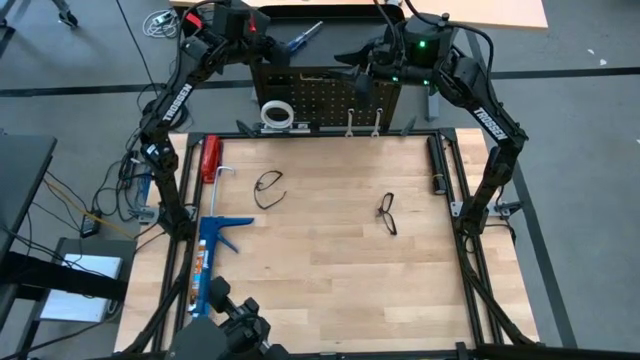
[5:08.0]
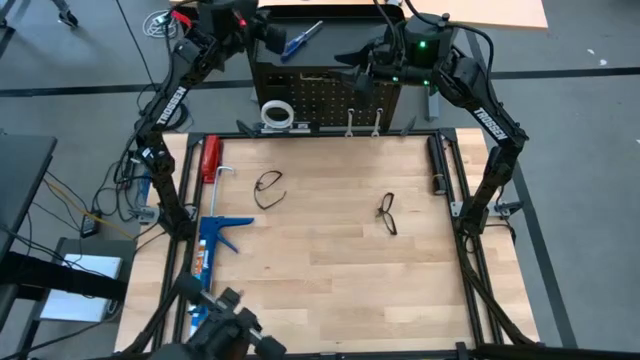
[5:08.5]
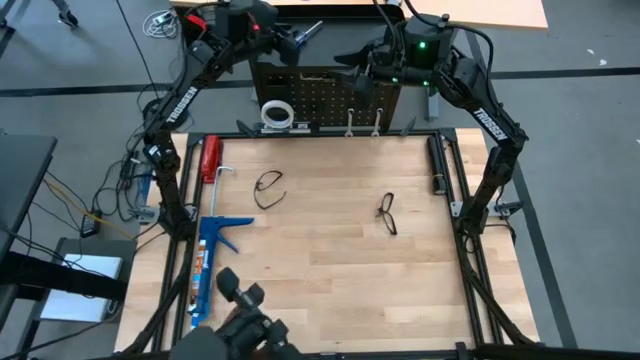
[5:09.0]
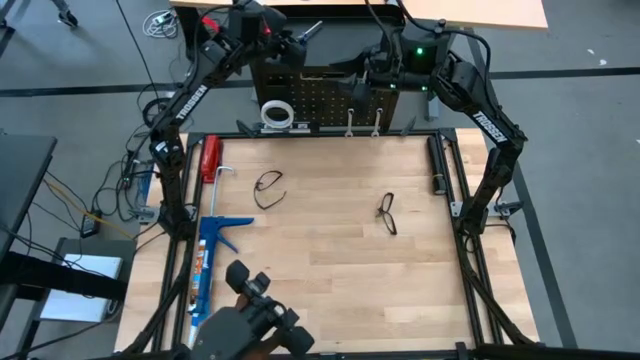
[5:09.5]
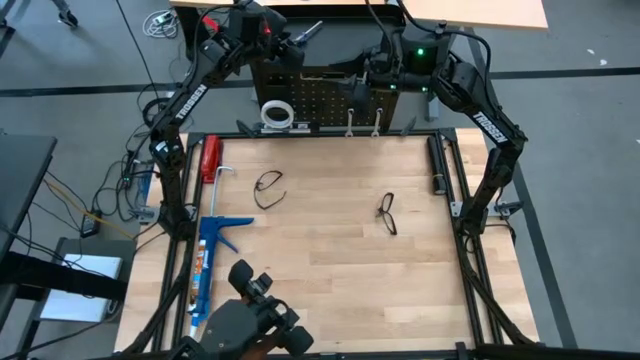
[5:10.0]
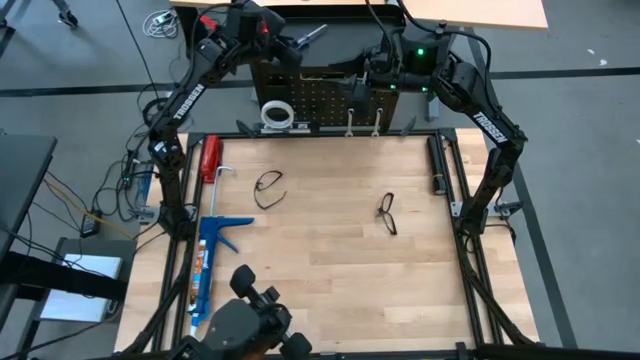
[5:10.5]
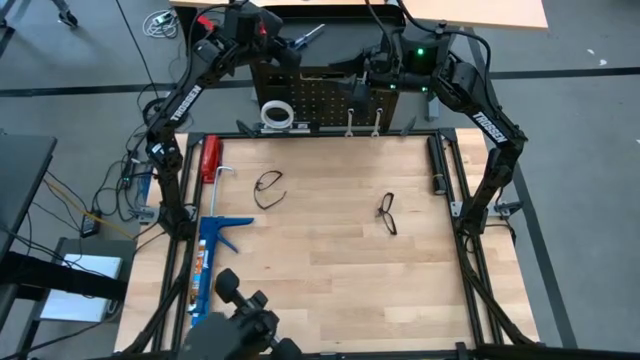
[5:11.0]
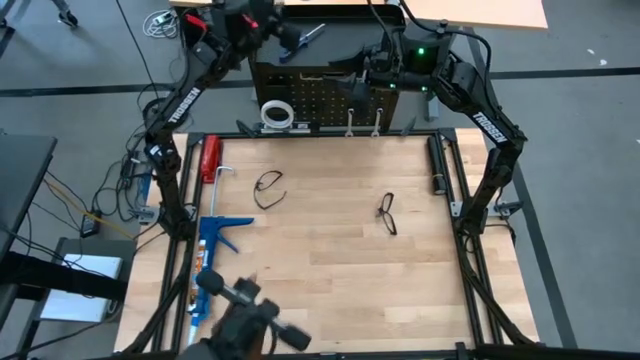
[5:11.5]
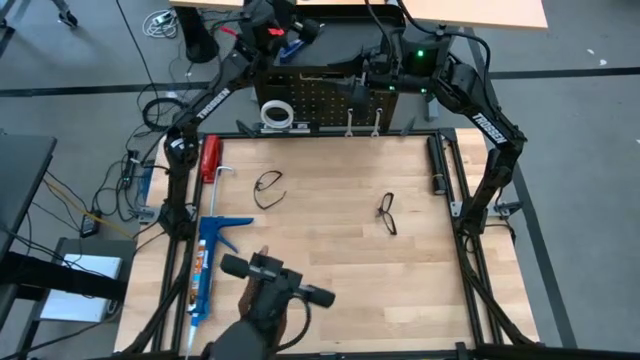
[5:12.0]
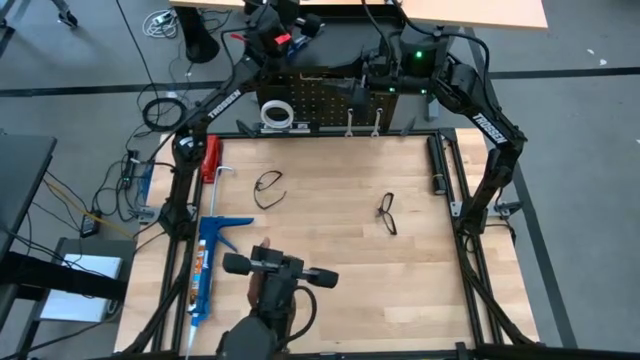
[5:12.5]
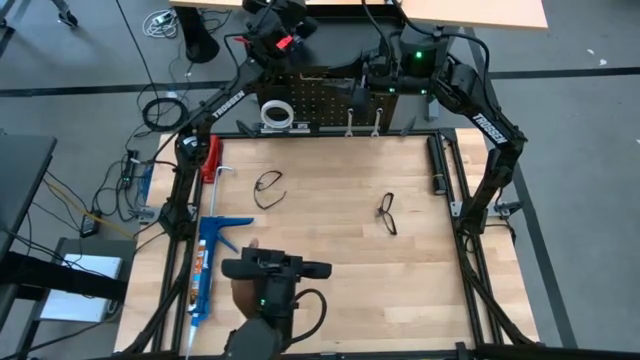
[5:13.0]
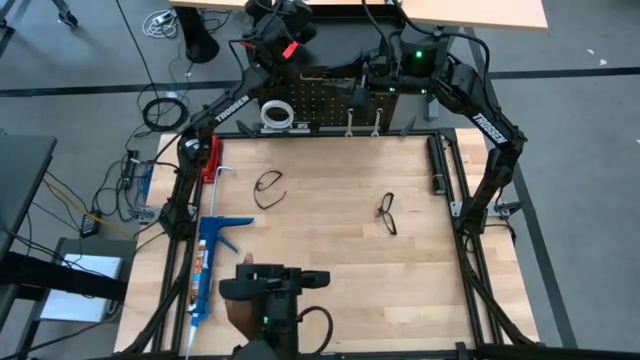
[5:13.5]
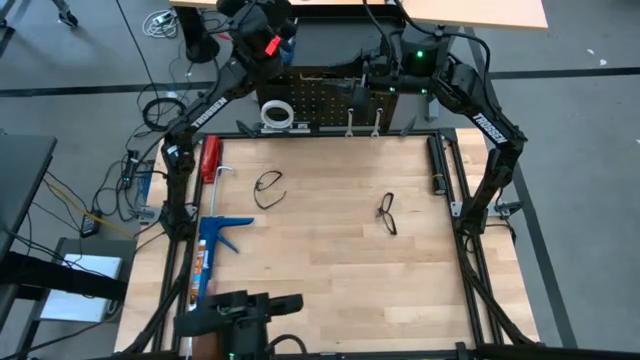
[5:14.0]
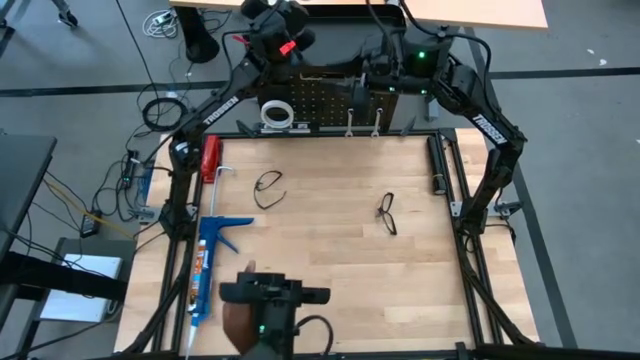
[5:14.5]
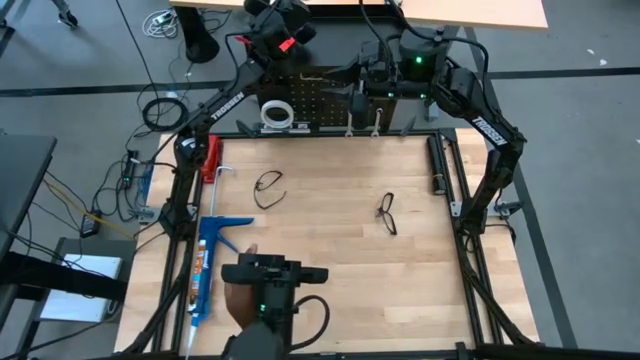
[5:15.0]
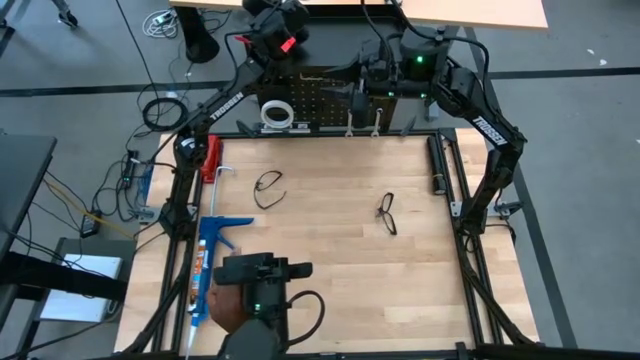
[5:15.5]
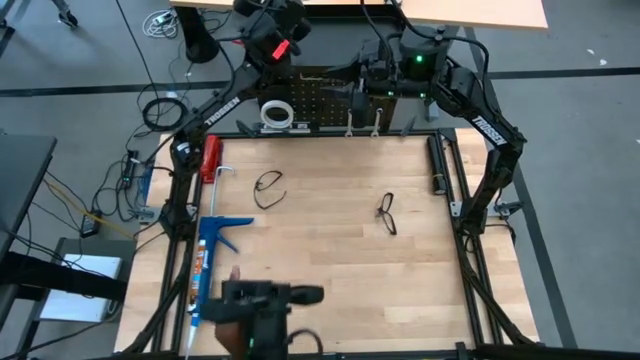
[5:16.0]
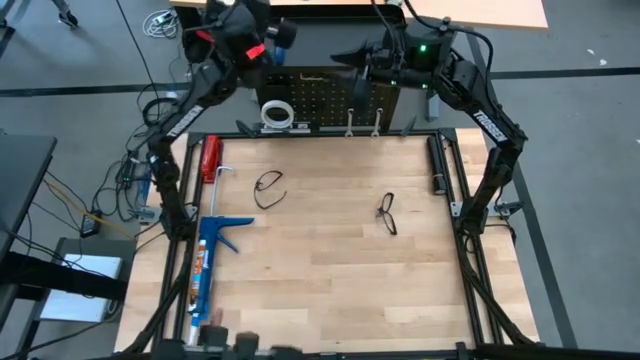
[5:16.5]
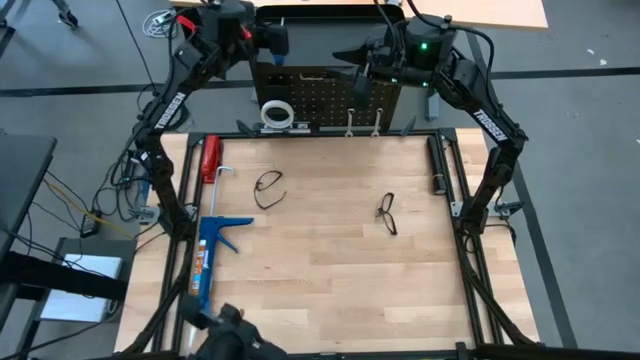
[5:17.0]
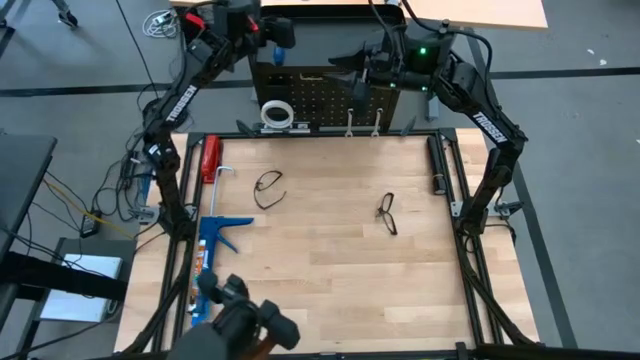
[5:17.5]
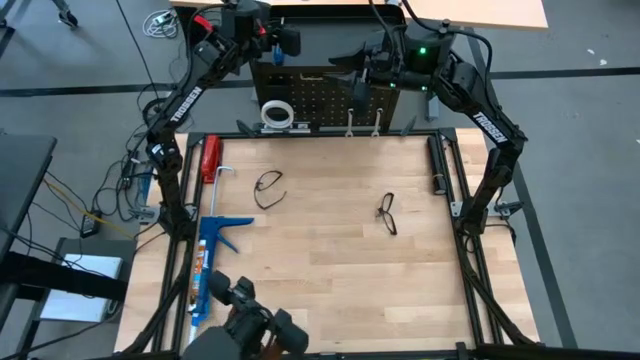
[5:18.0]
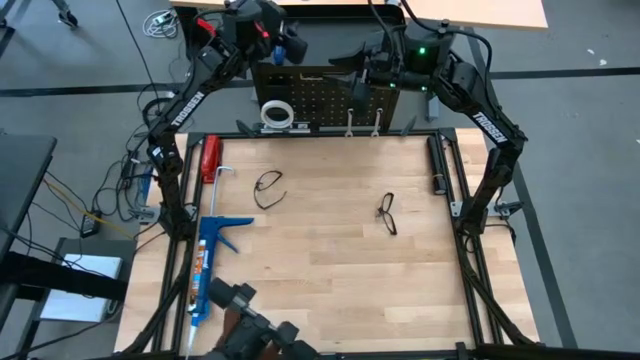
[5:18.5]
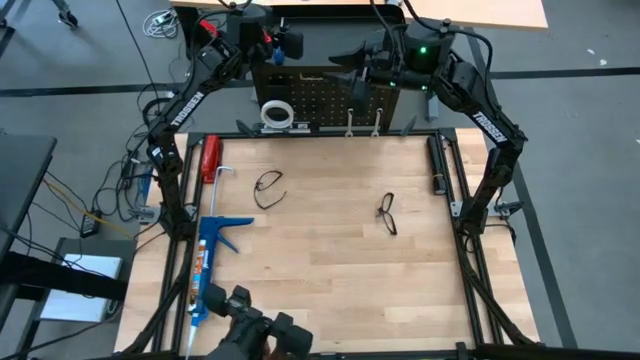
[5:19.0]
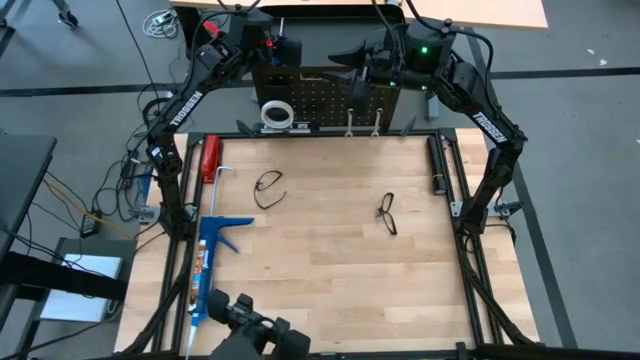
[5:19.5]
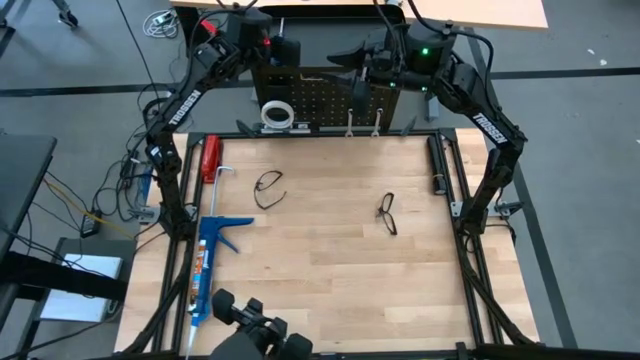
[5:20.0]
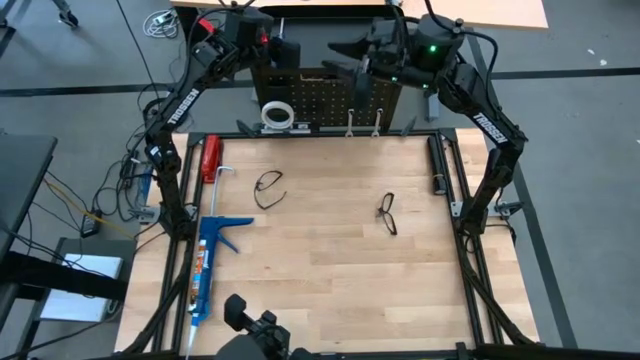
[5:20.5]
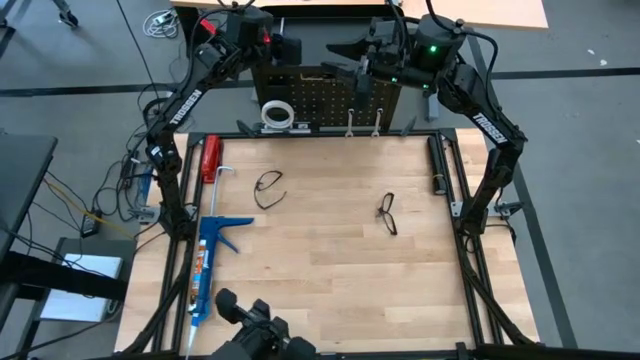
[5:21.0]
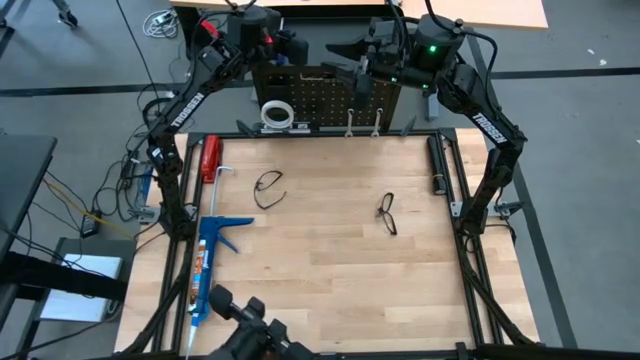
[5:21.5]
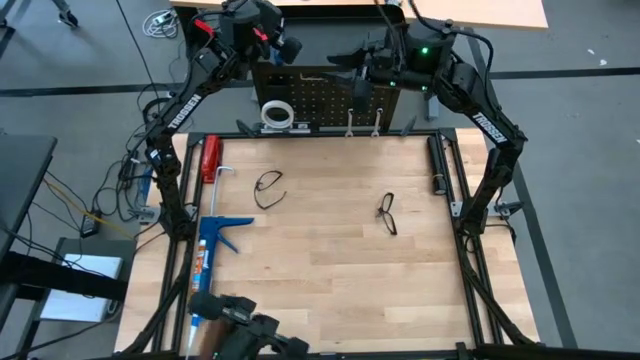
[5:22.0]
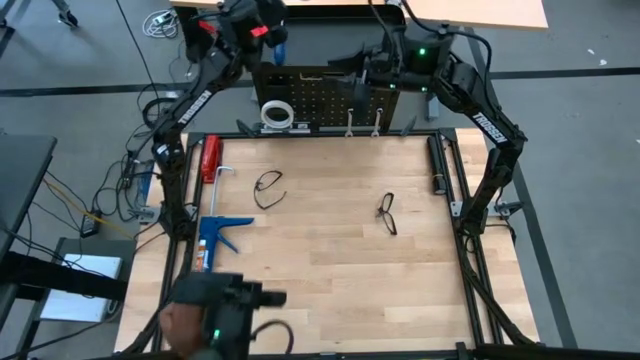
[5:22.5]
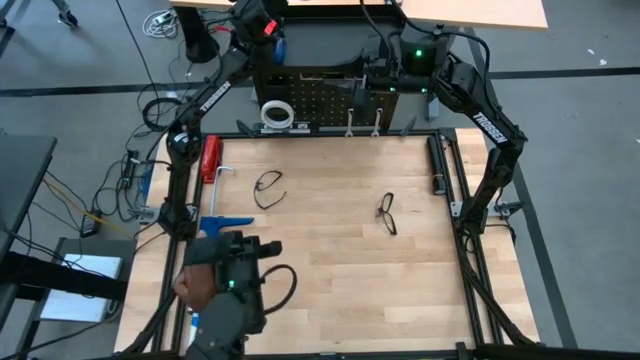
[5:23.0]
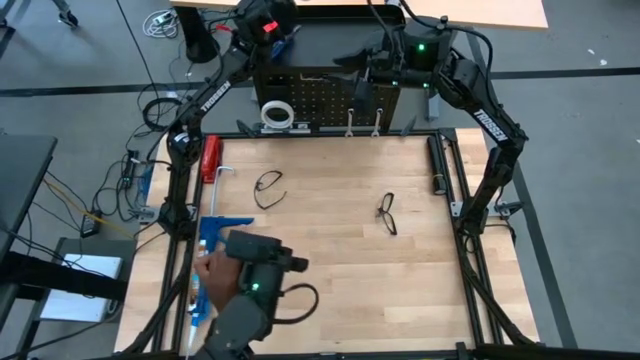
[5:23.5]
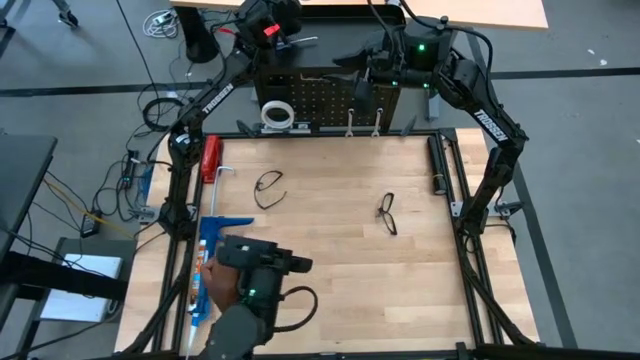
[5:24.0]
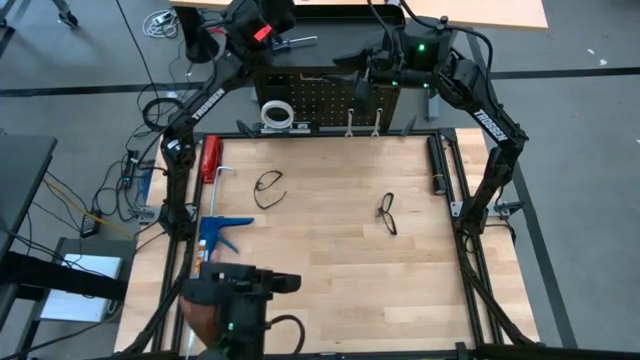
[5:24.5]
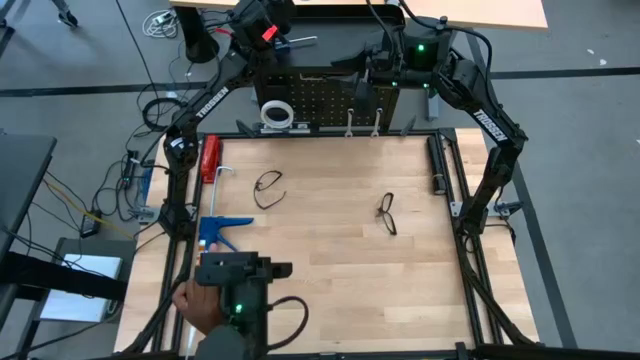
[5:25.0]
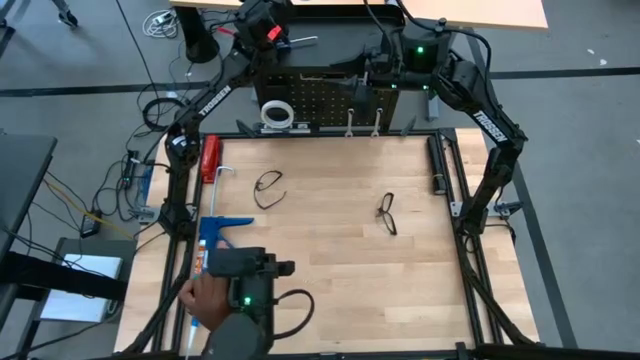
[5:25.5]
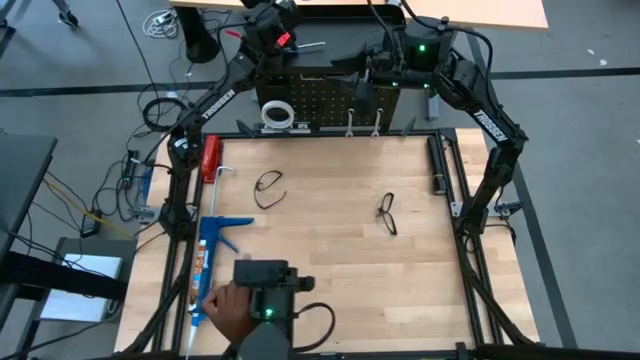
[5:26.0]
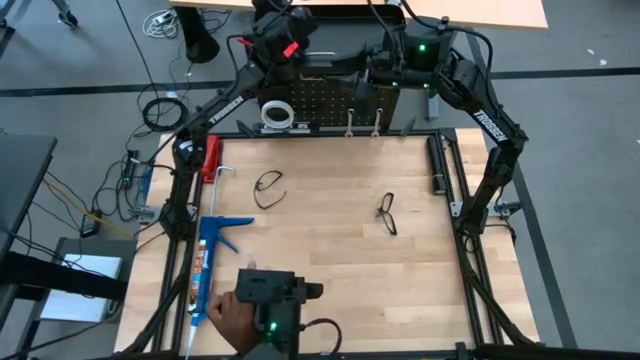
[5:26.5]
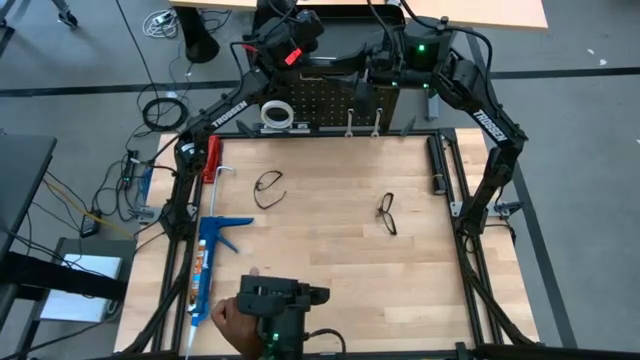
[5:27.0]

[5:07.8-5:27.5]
Task: Hang tools onto peg board
Remove the blue screwdriver from the black pegboard

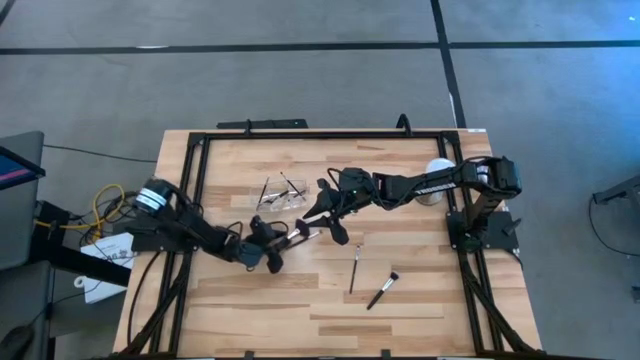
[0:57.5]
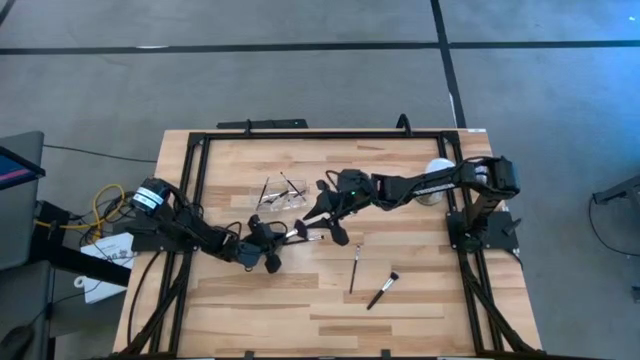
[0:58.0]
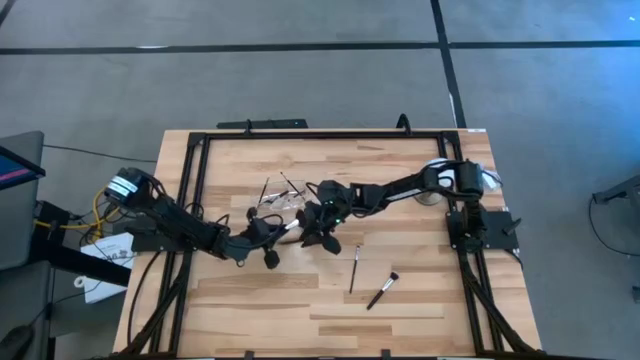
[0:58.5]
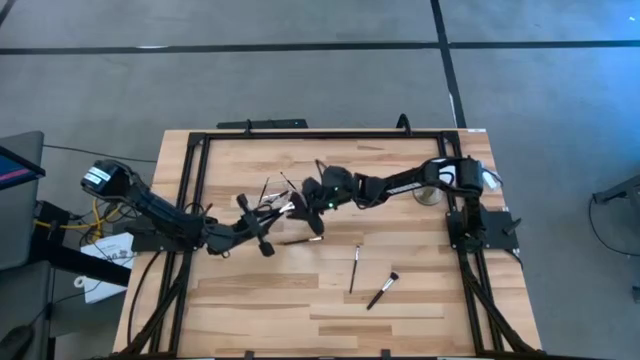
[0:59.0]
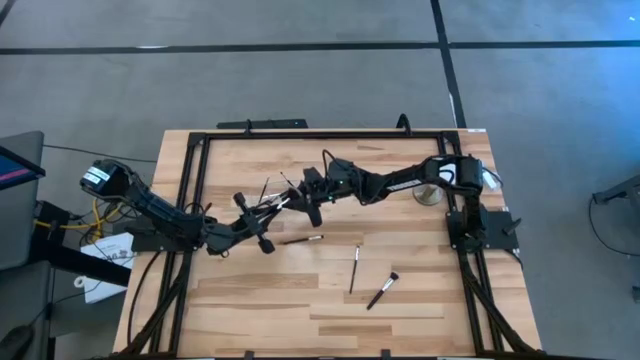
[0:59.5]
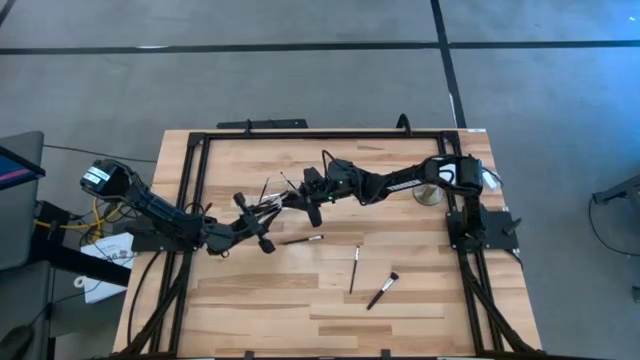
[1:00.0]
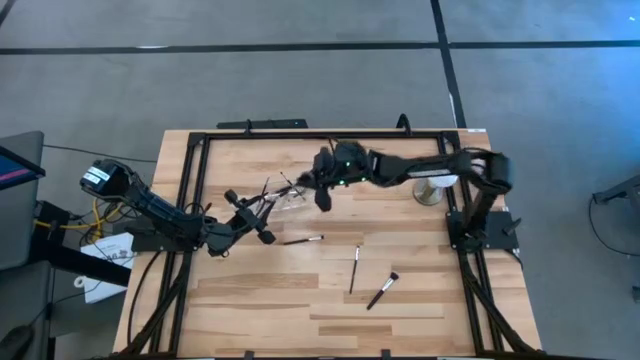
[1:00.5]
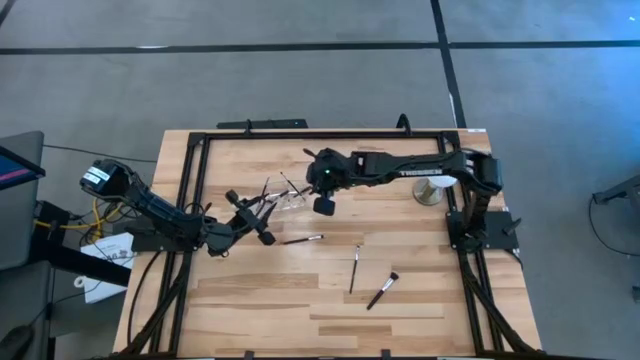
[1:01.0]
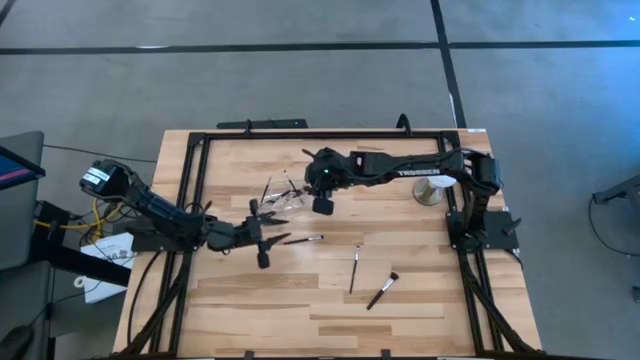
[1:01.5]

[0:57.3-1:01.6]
Task: Put items in baskets/containers
Put the highlighter brush into the transparent organizer
